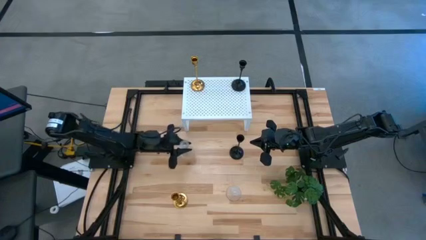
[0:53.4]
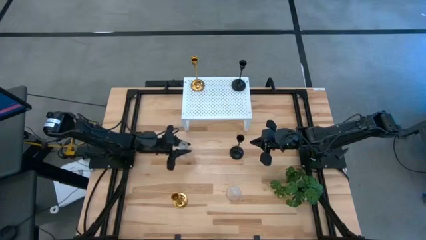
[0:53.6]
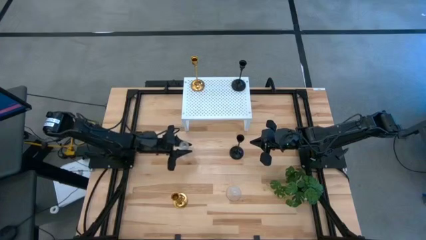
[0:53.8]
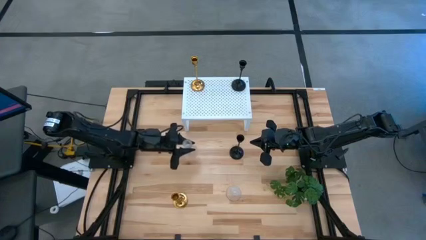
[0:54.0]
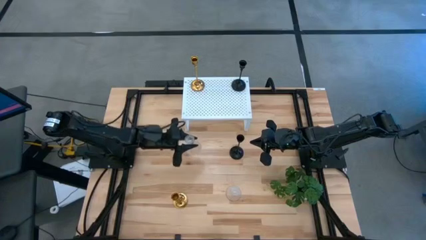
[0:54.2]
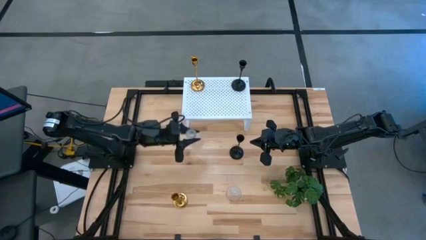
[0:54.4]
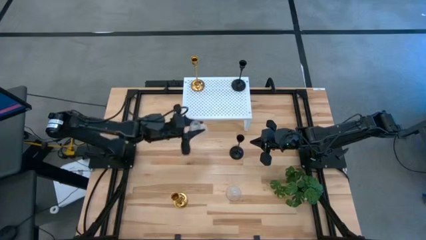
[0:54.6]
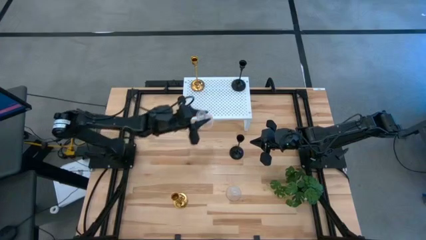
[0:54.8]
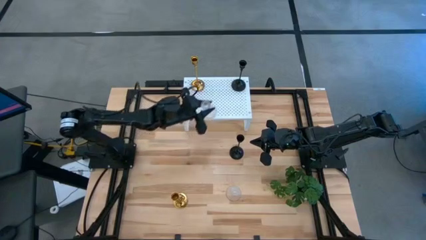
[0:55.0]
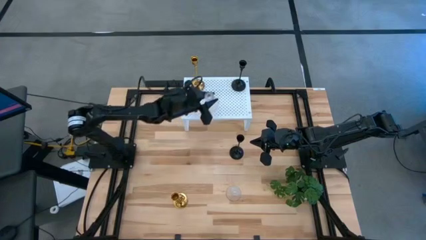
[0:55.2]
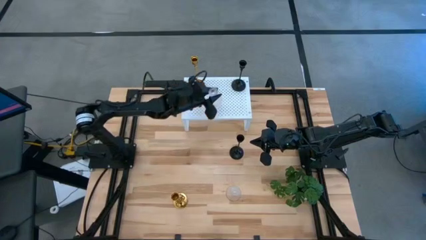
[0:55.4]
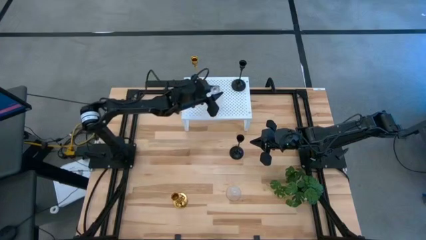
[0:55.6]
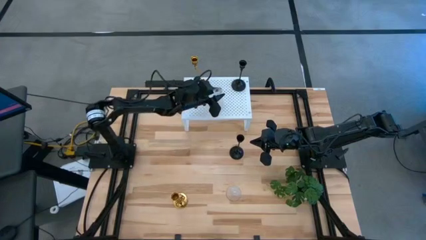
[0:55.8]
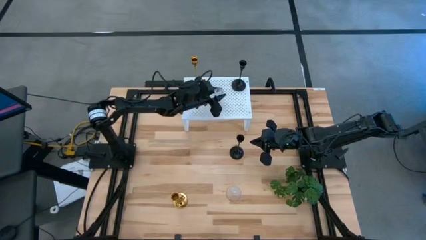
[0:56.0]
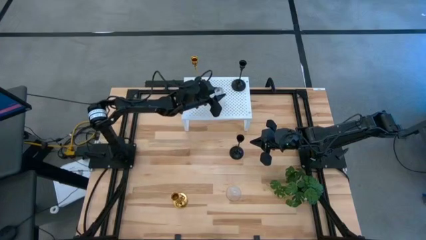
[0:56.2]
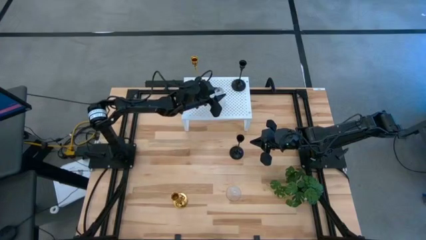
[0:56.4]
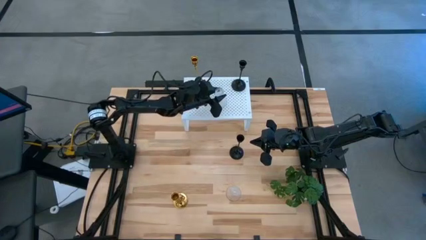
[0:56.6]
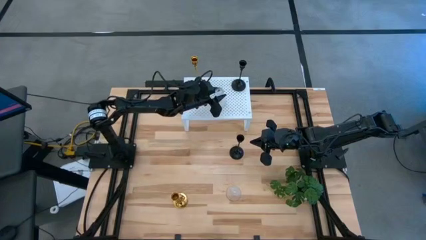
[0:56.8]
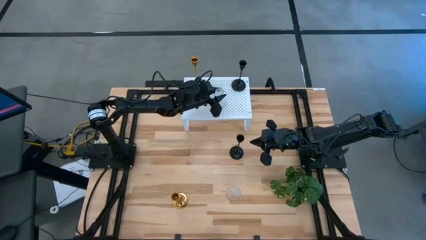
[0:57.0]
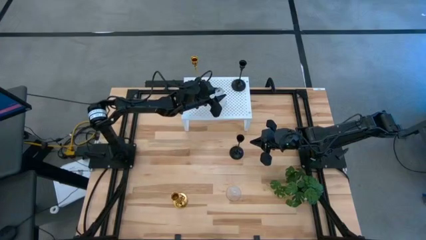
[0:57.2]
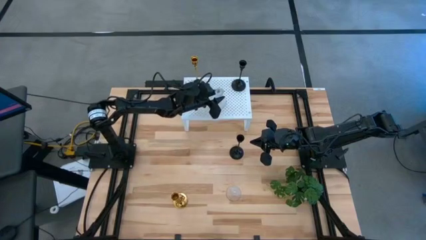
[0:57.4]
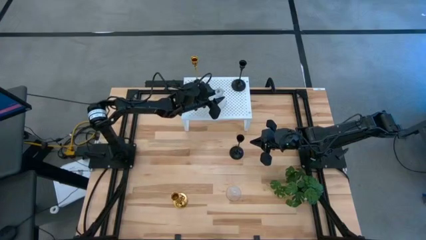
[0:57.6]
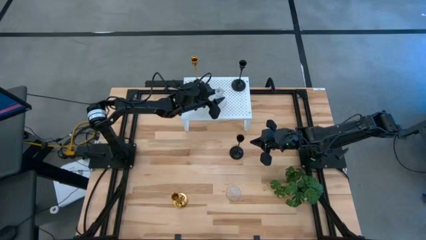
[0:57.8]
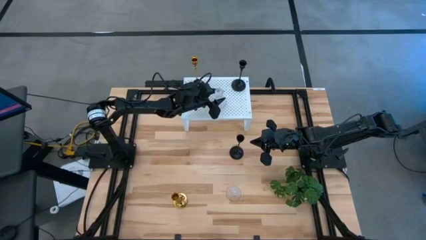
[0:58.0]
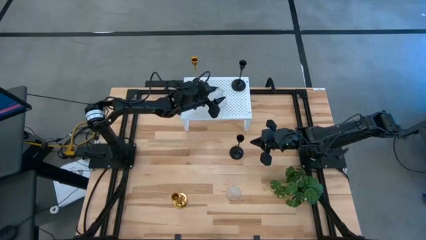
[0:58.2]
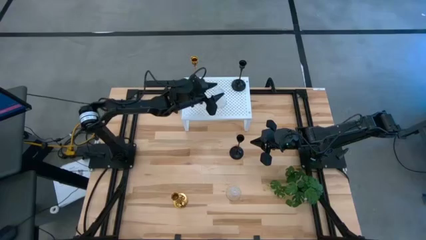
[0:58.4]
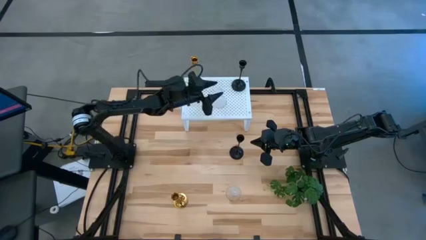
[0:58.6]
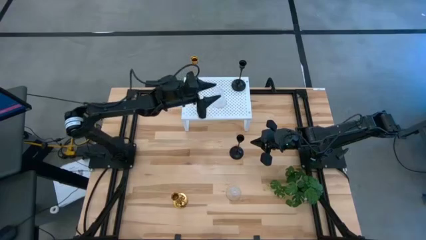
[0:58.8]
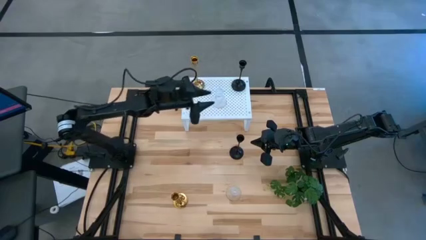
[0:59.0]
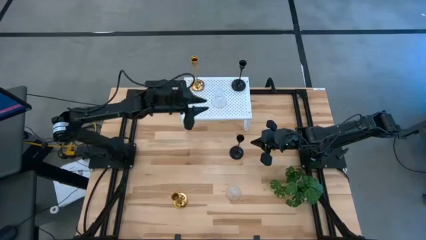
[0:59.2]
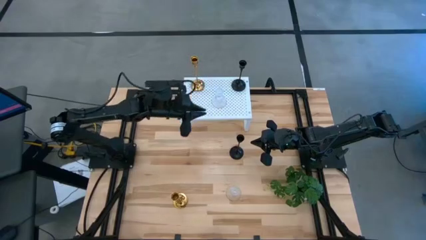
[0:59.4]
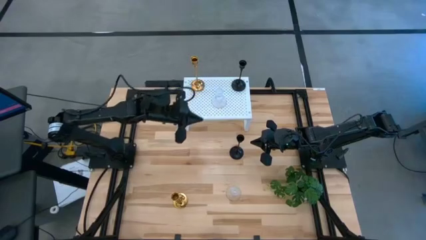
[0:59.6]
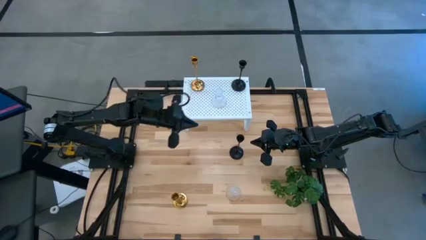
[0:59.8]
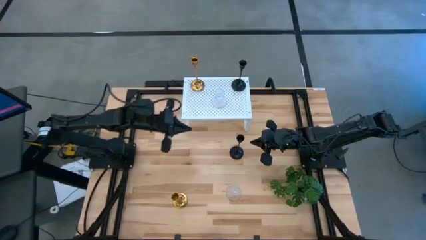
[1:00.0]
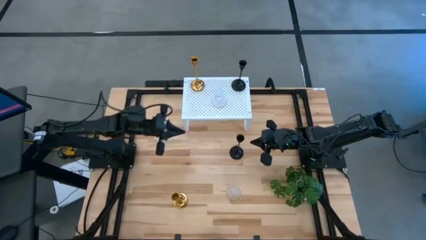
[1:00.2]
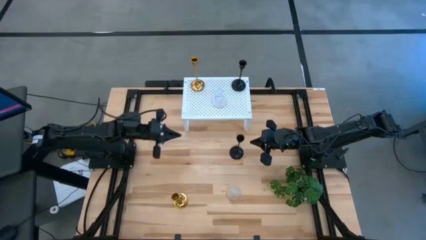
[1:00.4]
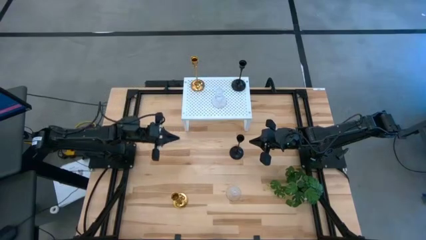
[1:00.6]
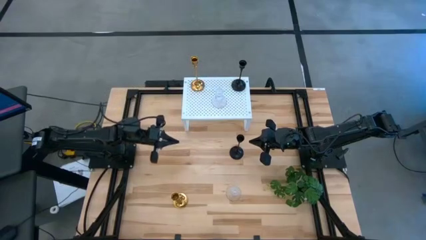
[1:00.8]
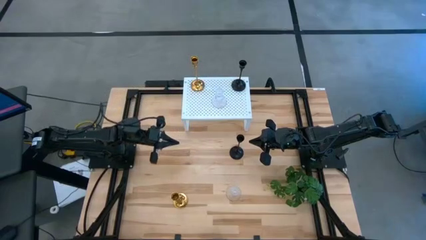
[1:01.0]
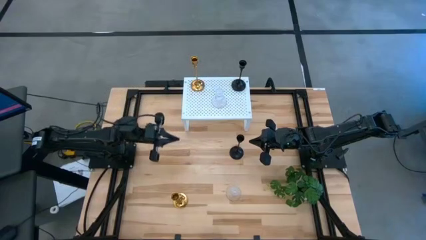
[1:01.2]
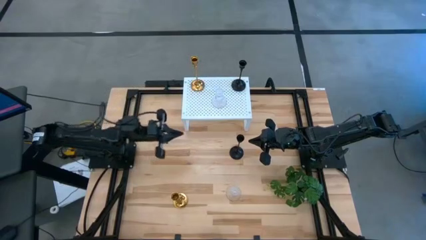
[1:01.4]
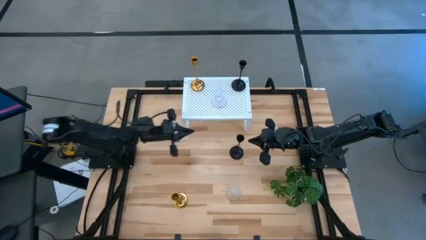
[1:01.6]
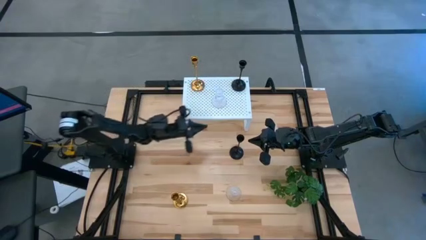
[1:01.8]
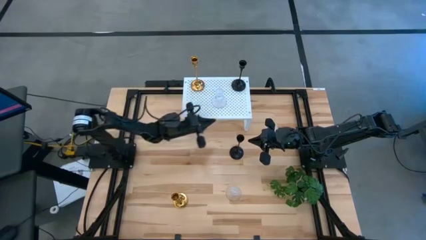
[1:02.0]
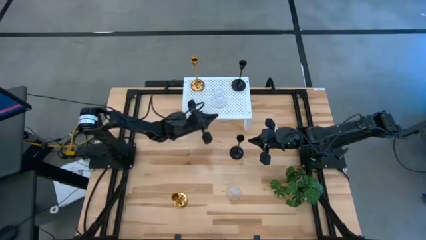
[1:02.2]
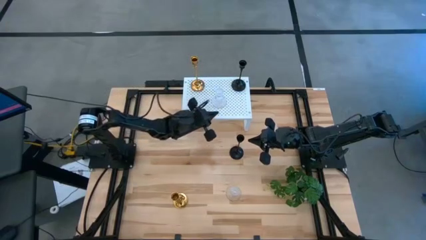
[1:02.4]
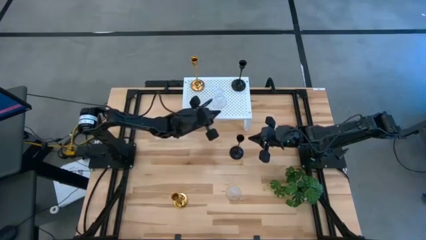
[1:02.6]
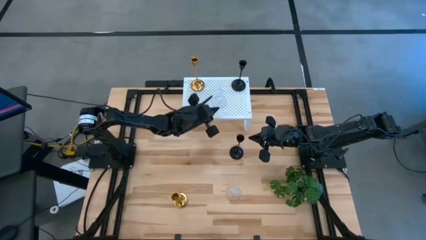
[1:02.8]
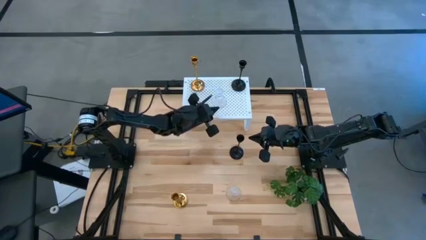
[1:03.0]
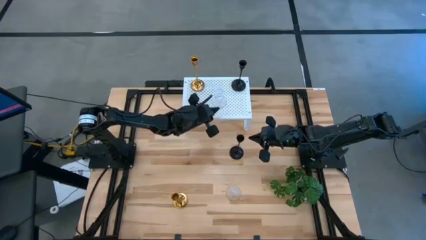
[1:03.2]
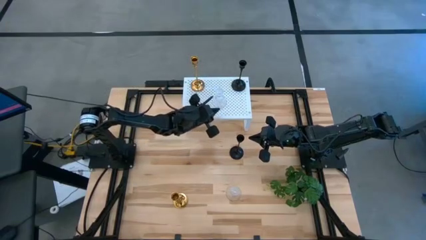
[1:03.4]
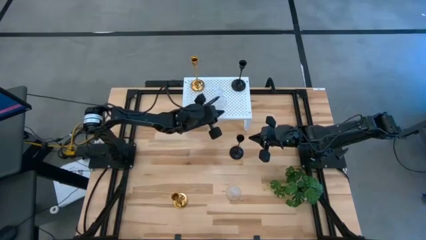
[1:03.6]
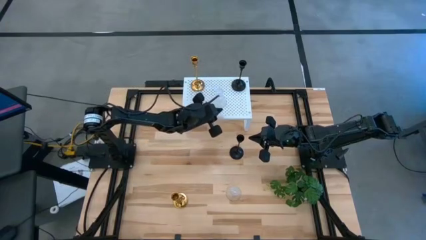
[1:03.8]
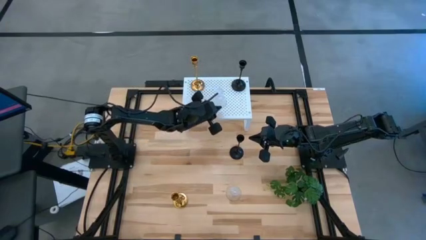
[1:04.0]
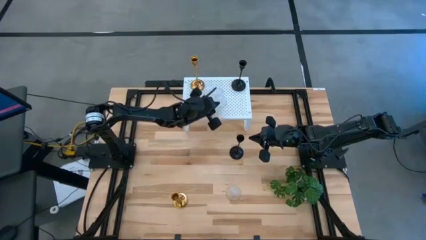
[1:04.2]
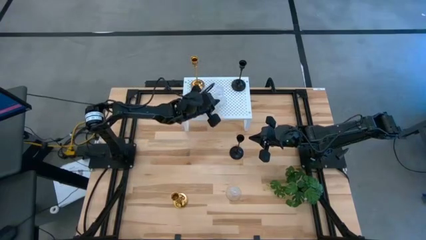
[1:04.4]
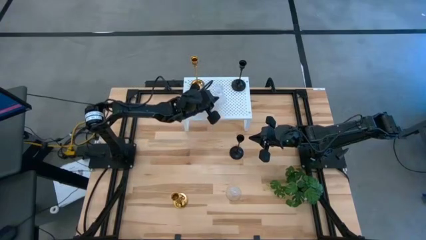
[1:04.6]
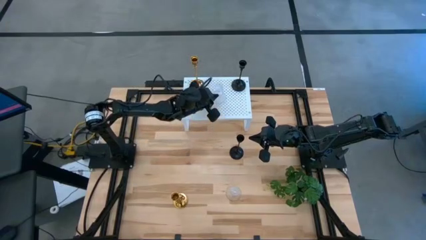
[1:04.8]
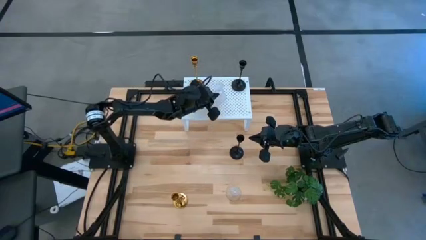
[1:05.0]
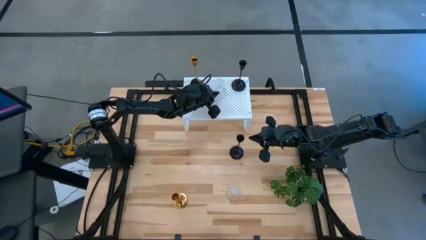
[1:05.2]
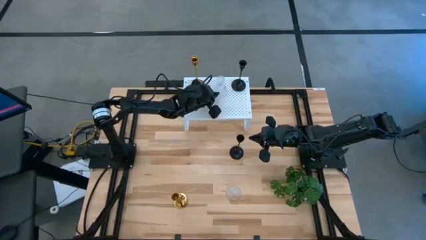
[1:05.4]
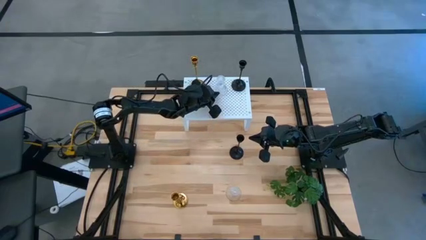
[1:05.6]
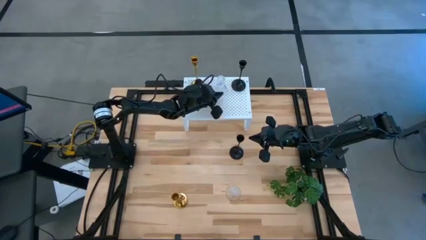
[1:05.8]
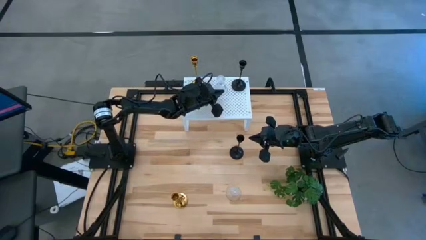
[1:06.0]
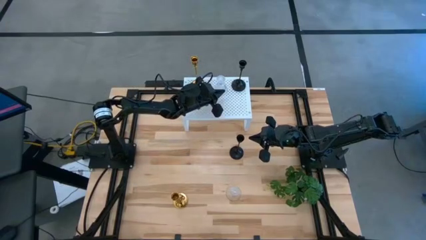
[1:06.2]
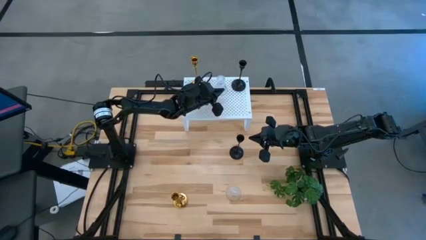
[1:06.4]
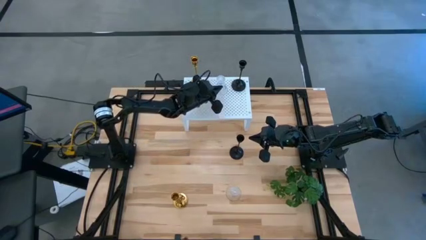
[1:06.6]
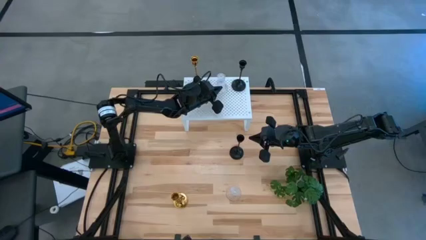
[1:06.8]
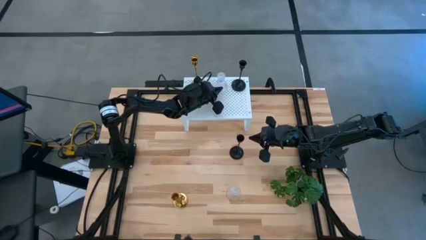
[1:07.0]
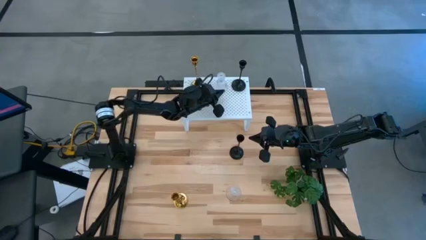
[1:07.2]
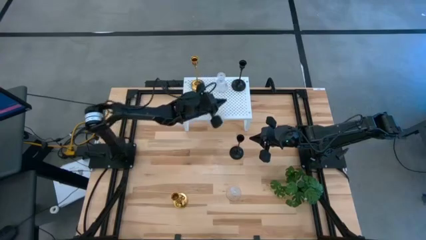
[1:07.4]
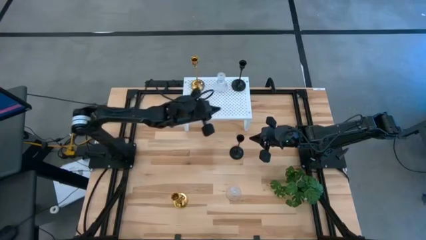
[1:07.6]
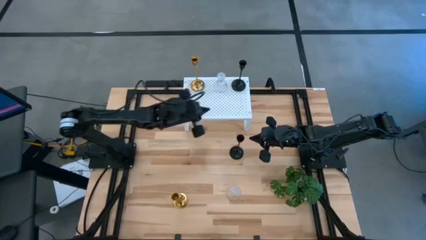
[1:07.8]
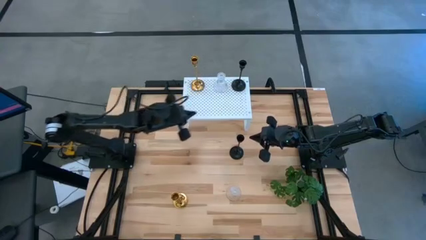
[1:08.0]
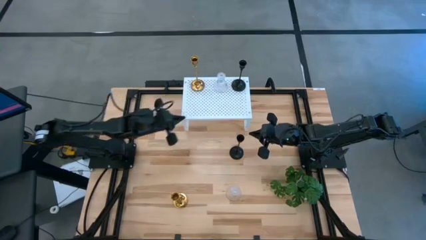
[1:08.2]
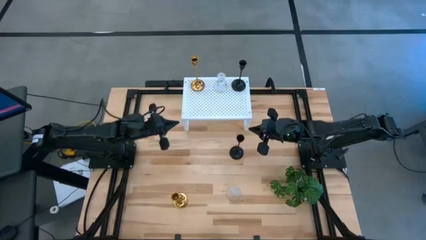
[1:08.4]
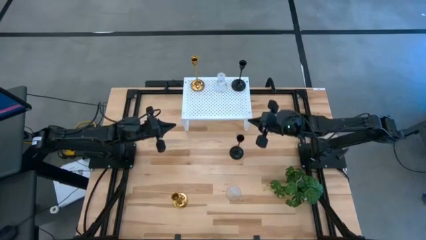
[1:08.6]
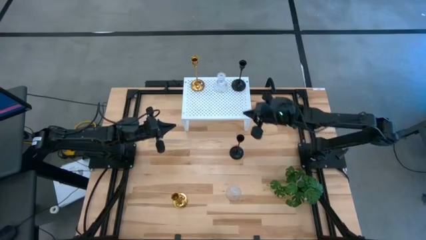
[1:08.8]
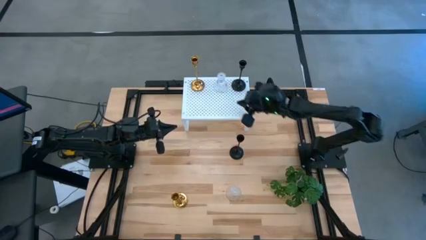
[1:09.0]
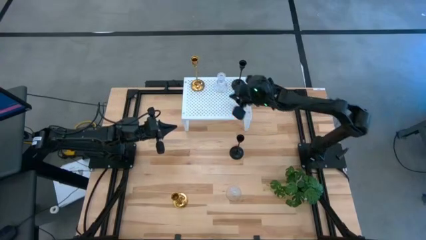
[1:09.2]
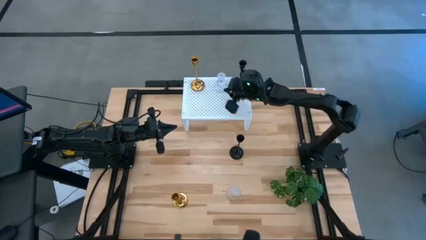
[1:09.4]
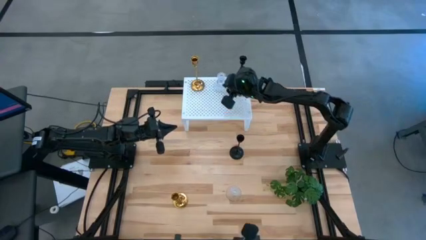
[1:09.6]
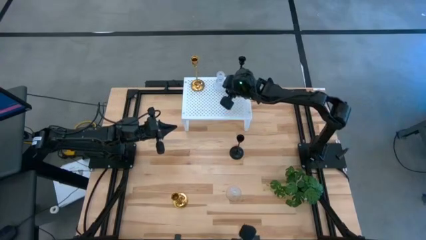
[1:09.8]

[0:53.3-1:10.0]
Task: Pick & Place candle stick holders
Put the top transparent candle holder on the shelf
